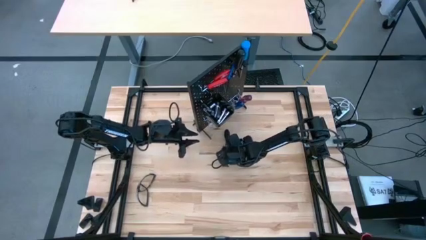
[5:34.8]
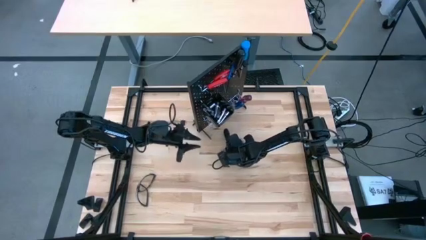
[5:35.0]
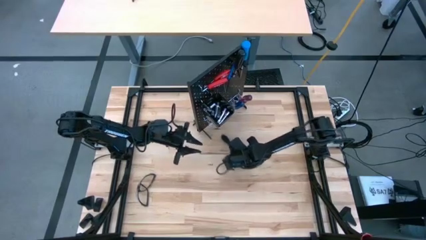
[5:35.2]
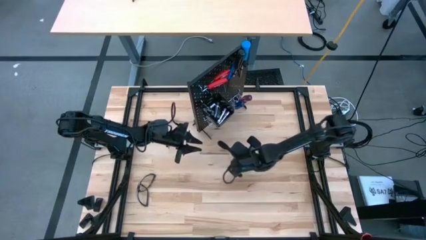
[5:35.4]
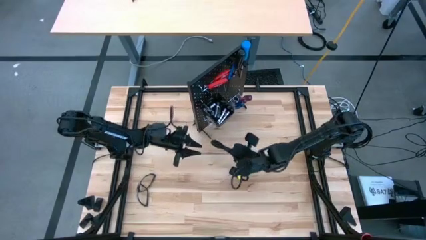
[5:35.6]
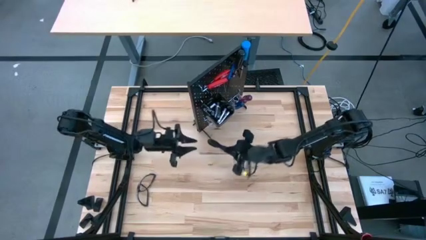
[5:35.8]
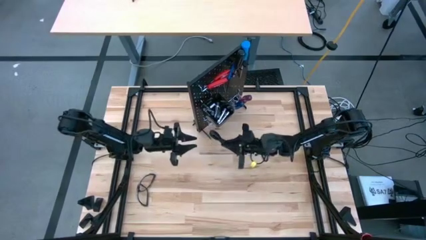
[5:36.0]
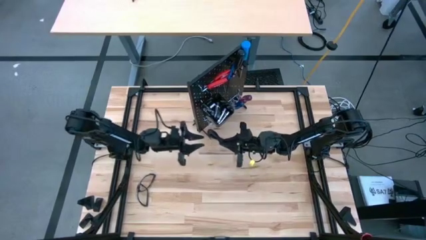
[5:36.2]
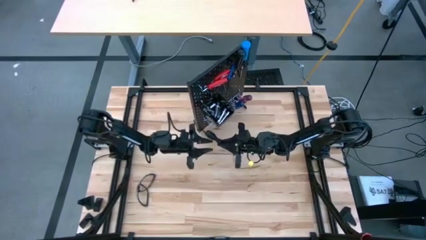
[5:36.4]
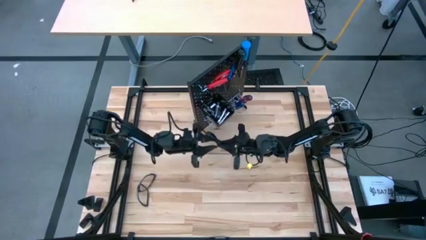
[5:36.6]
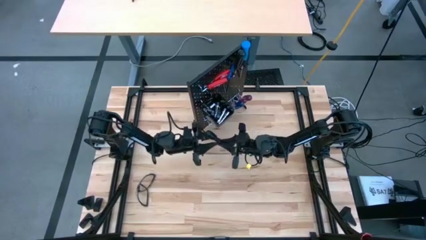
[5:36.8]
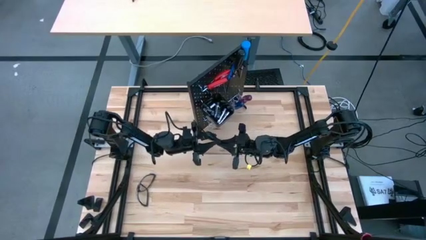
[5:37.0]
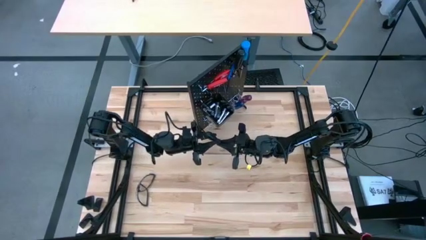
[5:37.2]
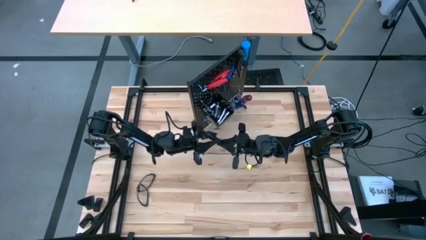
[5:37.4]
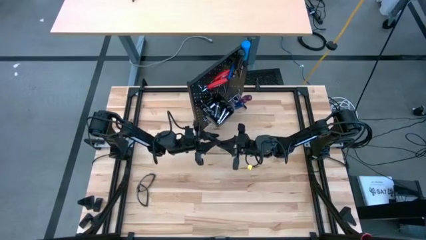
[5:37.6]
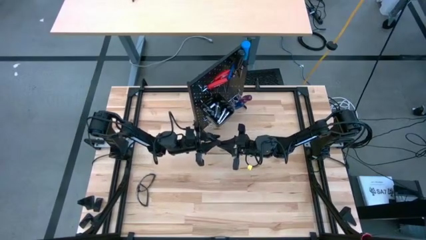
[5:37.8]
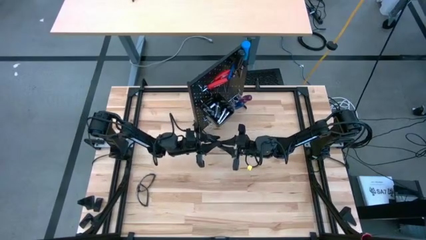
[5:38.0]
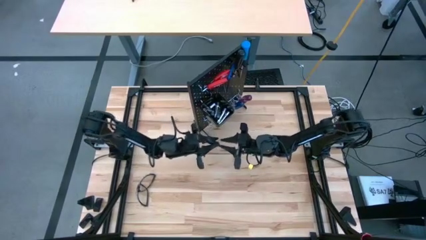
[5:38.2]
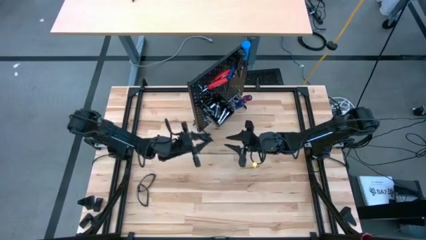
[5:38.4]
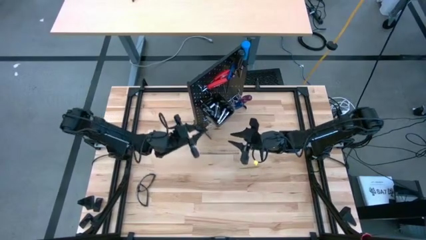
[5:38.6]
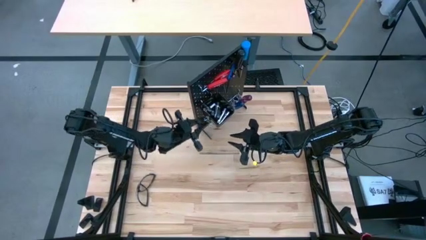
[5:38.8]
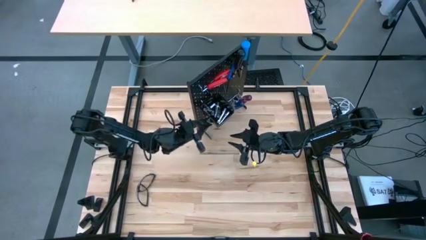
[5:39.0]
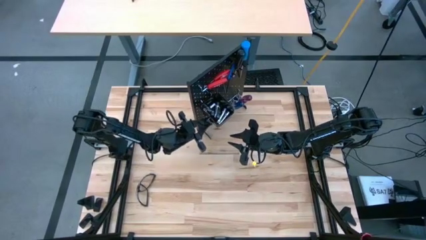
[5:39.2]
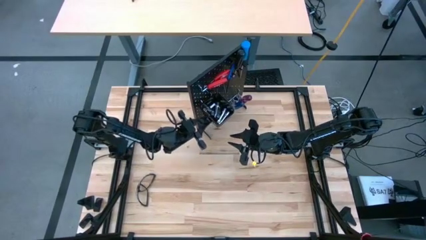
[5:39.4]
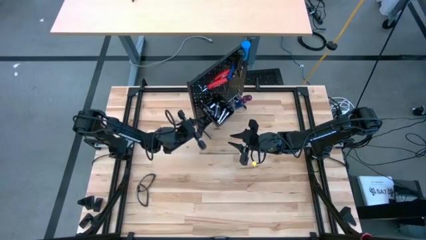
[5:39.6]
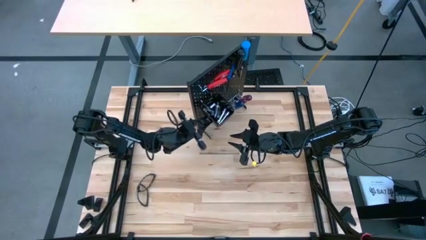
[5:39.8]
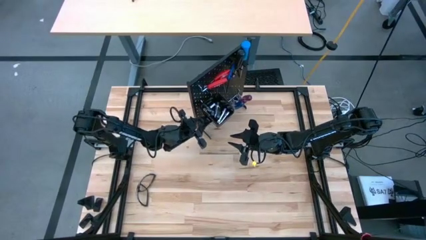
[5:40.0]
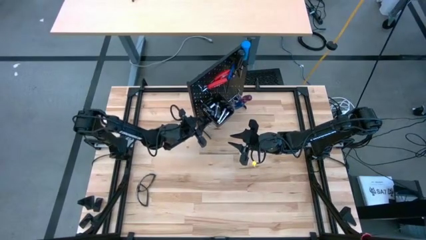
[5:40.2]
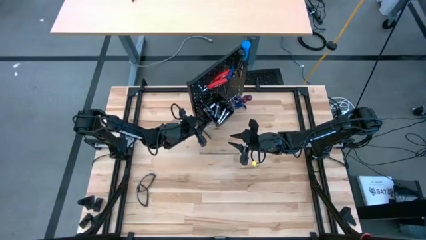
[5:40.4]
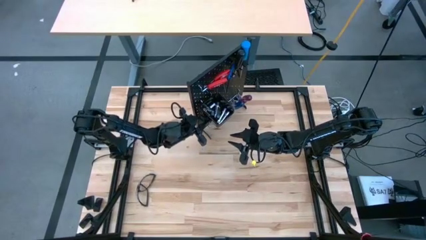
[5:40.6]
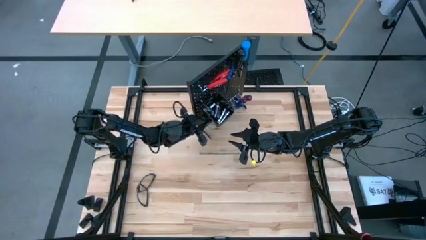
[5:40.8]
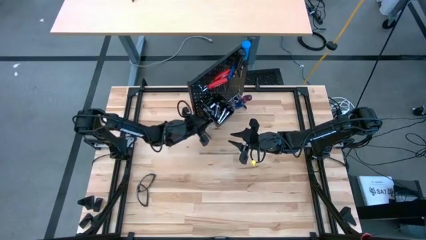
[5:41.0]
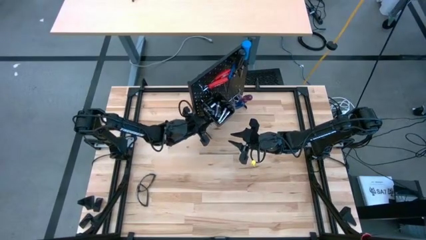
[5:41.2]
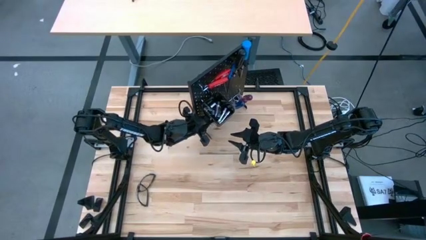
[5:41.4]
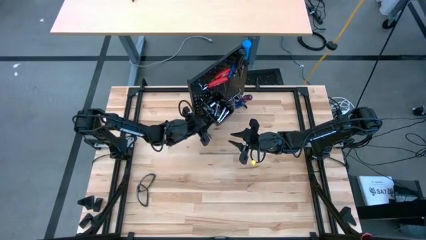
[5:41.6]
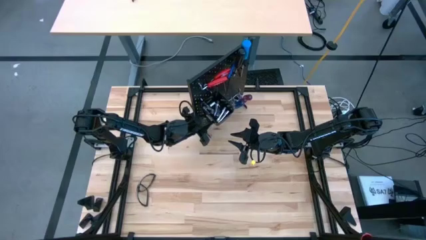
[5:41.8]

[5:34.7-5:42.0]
Task: Hang tools onto peg board
Hang the black screwdriver on the pegboard

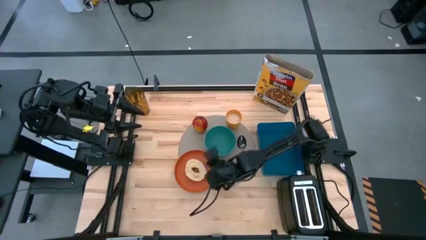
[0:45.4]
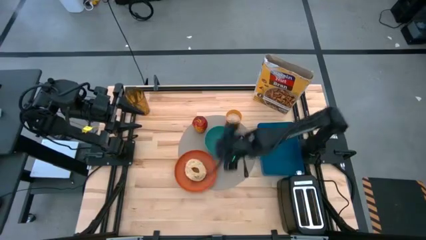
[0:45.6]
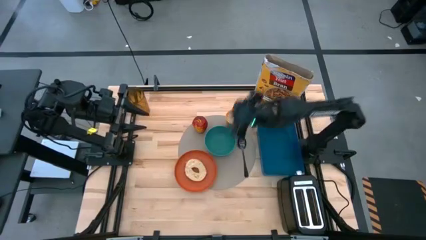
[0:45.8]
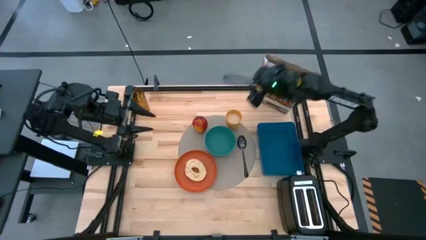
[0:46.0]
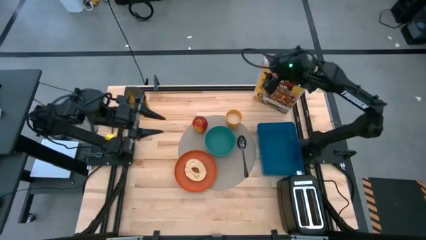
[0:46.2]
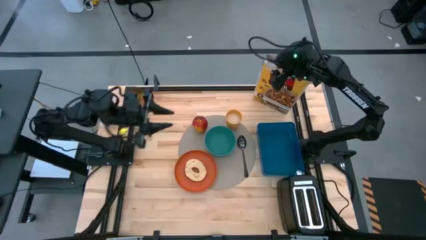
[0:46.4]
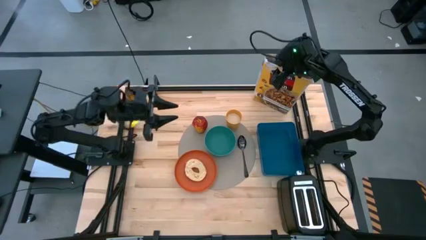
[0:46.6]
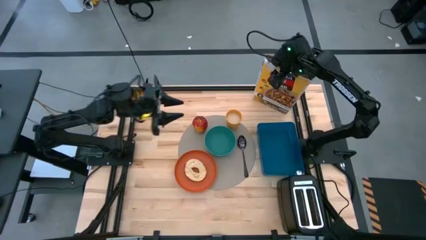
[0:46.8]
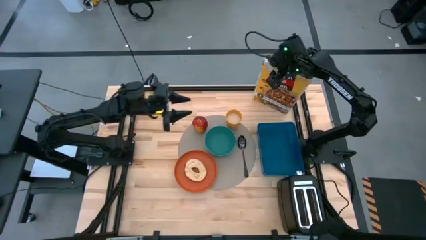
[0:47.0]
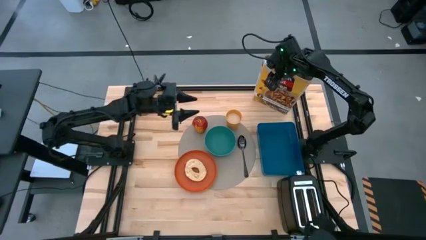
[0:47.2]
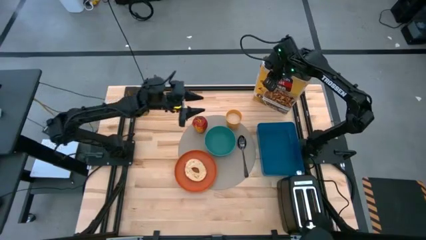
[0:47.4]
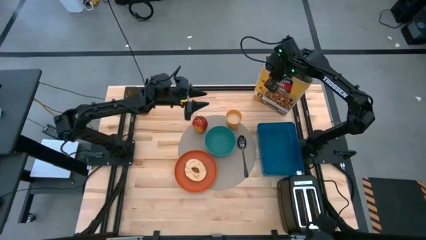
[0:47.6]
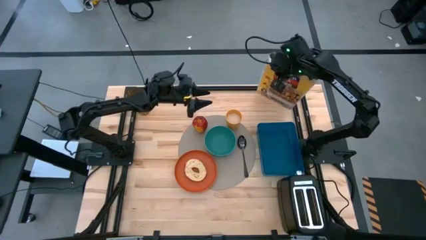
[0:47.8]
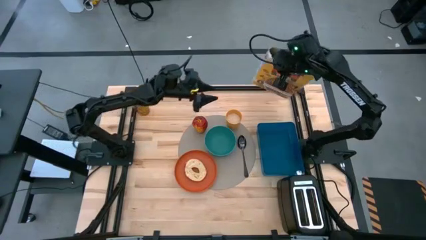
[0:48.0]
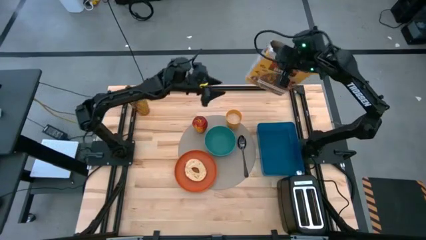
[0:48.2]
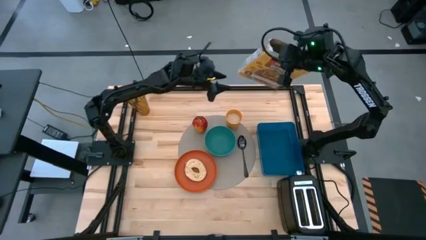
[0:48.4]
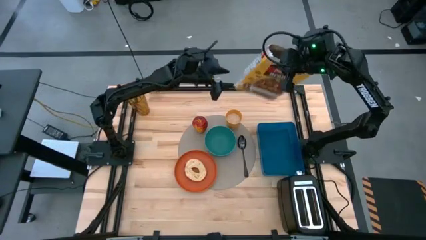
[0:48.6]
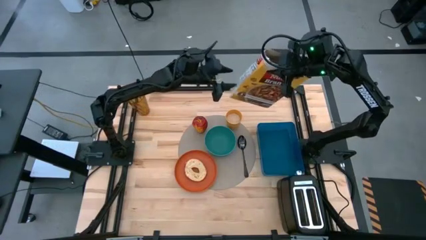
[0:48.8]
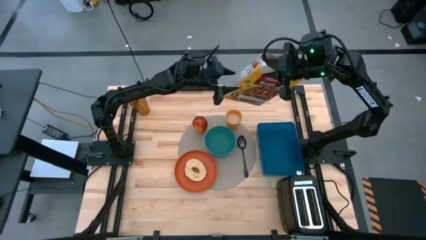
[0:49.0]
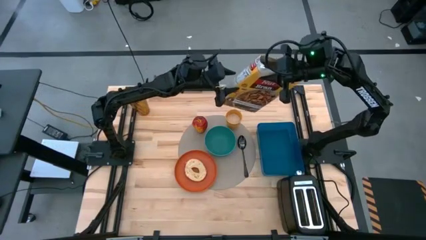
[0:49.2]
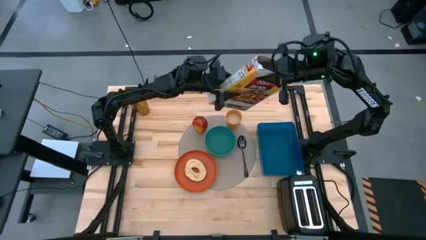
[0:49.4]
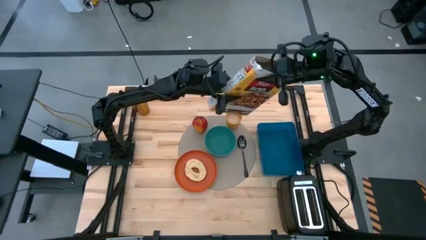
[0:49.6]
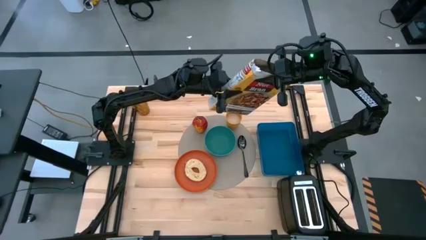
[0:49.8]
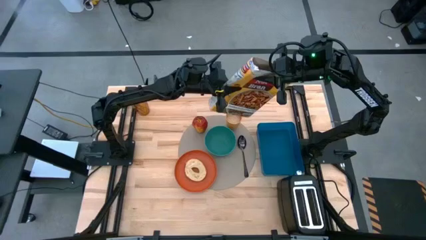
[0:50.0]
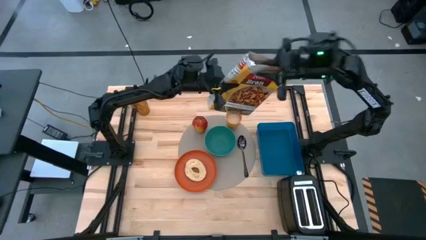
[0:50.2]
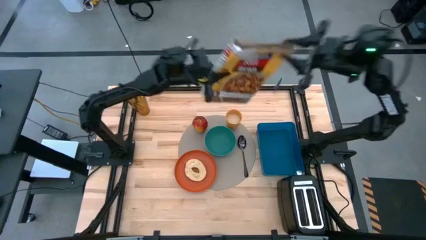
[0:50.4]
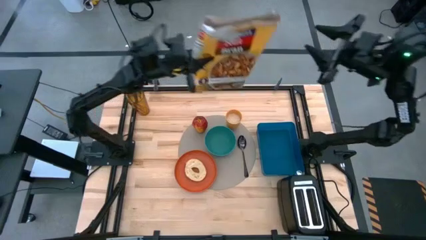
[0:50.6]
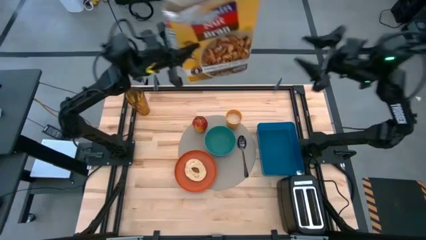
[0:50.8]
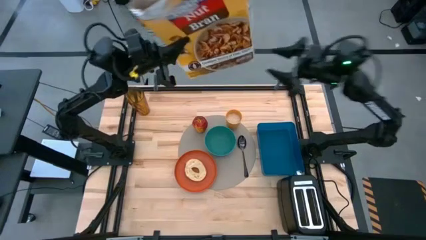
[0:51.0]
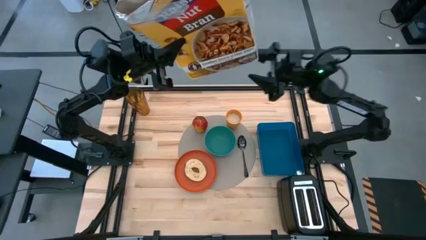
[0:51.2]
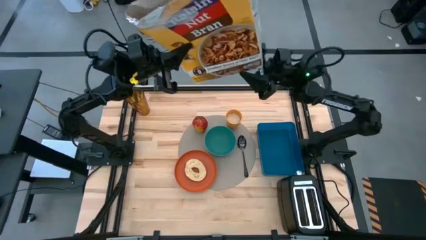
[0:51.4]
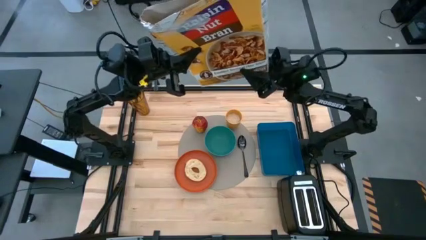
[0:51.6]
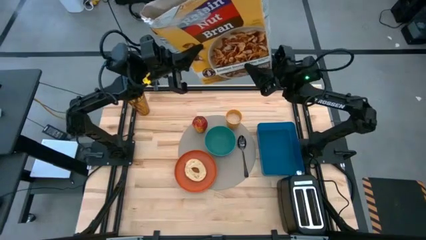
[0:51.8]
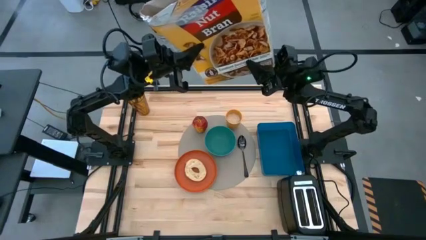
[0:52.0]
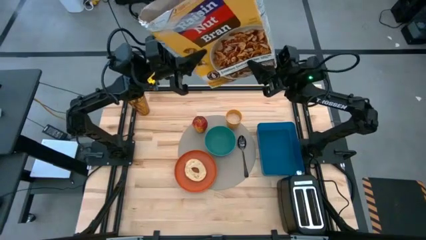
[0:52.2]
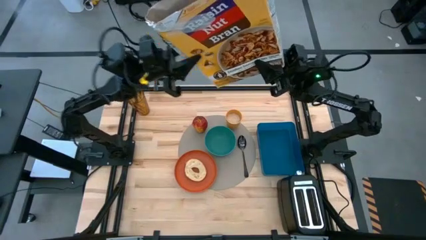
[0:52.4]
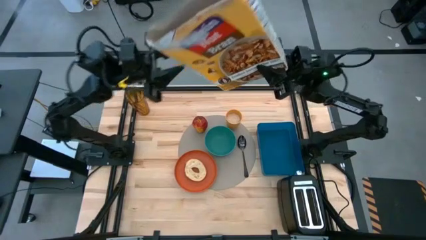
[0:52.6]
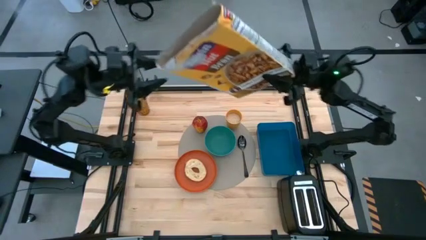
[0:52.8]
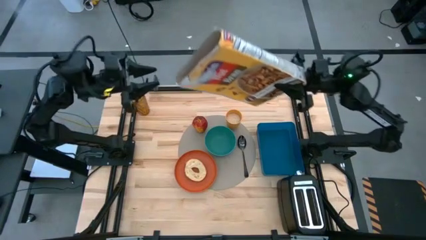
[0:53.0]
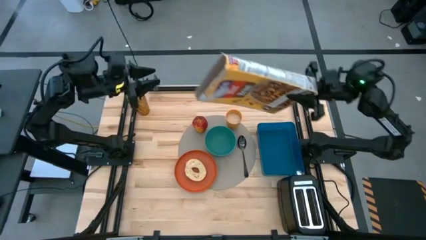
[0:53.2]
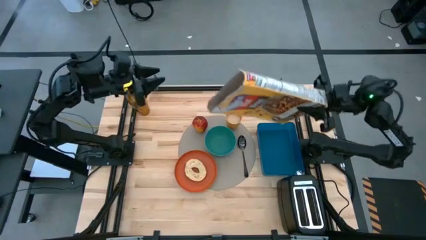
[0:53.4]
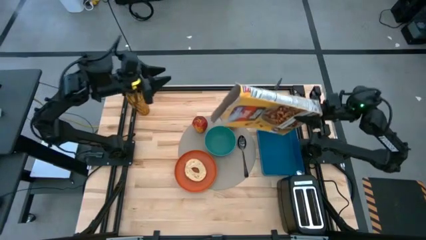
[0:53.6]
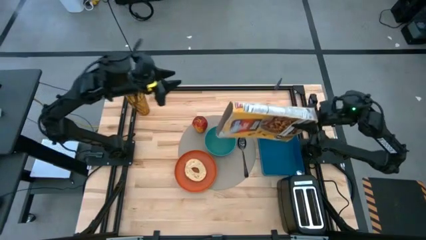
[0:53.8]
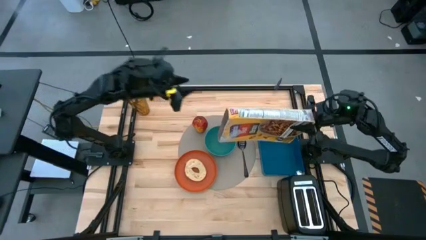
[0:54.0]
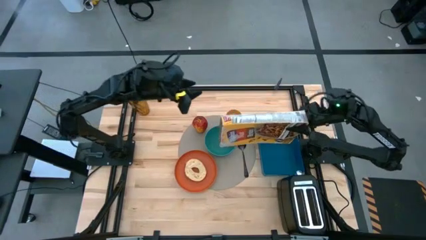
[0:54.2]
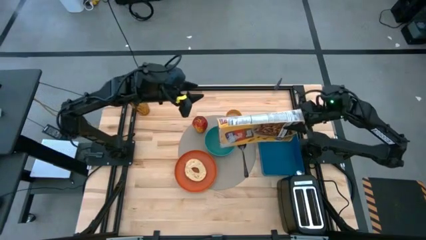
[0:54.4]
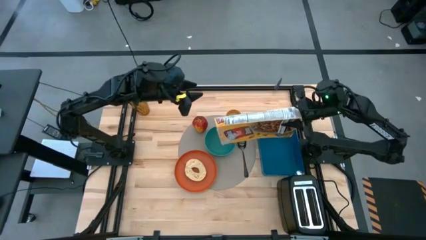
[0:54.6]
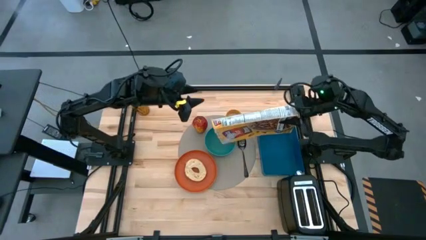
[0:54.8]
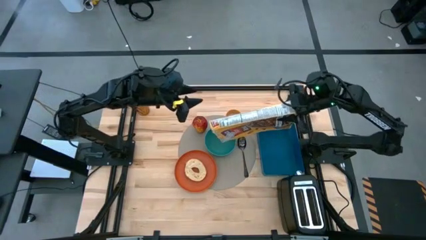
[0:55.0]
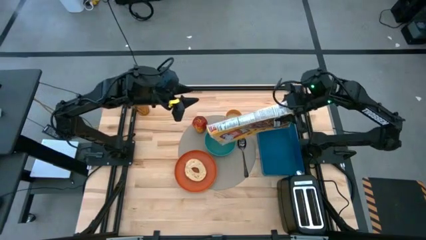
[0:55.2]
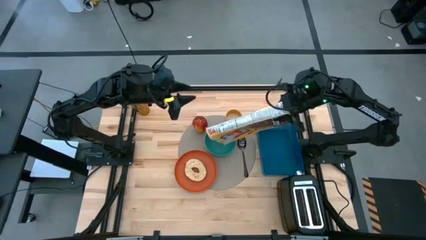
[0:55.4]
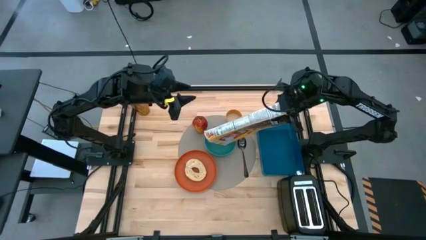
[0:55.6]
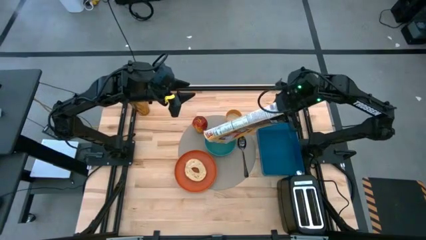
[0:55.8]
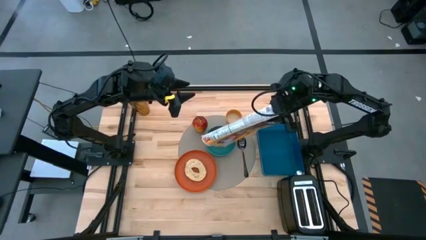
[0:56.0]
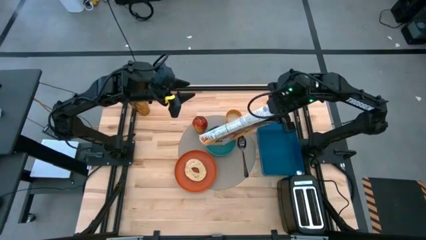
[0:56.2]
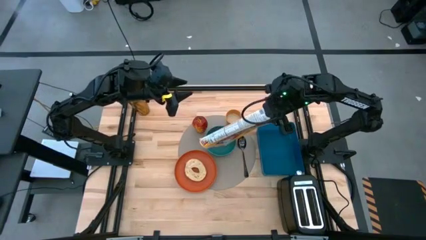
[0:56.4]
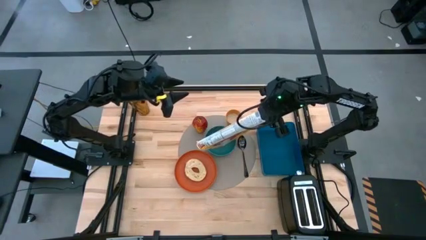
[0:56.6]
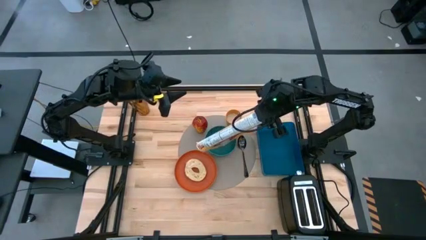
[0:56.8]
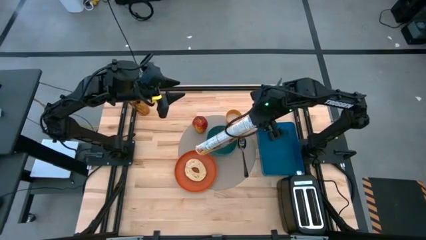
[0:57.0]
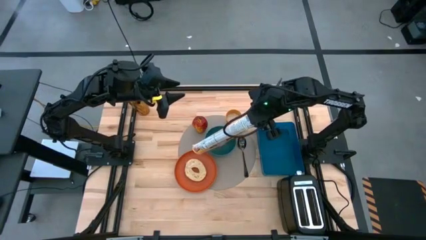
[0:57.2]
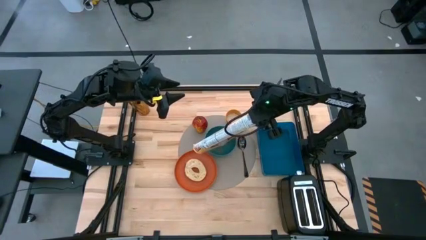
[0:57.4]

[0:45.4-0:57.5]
Task: Arrange a breakfast setting
Pour the cereal from the cereal box into the green bowl
